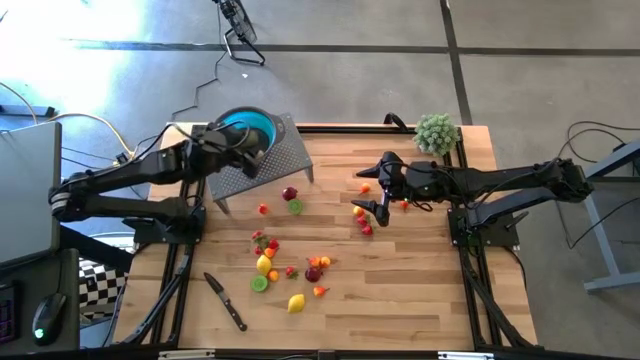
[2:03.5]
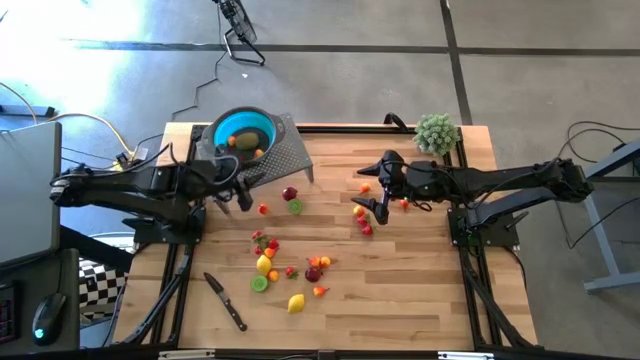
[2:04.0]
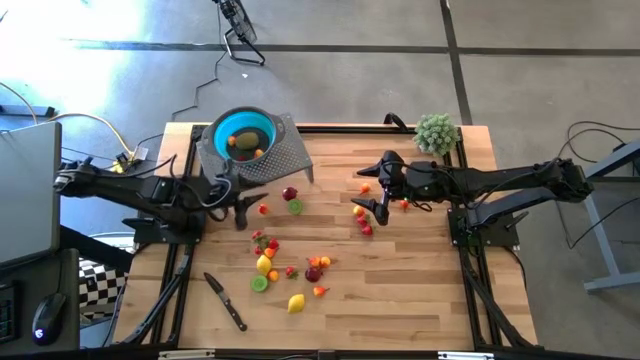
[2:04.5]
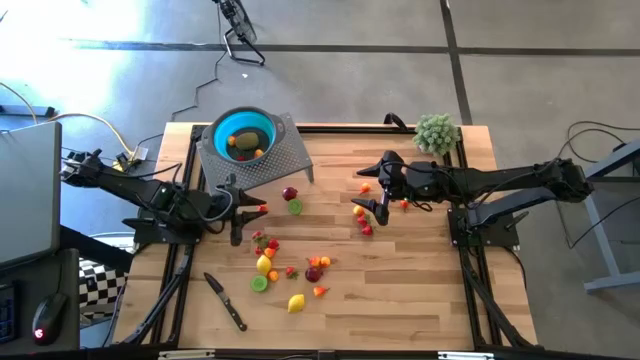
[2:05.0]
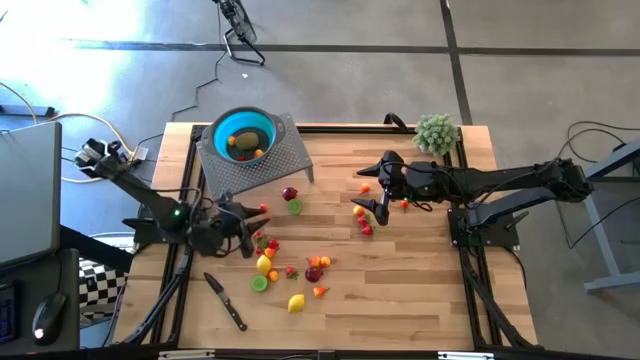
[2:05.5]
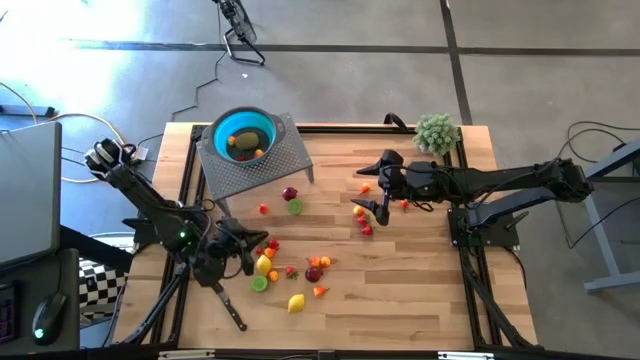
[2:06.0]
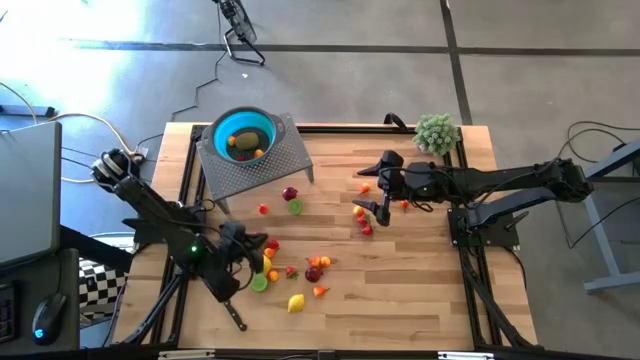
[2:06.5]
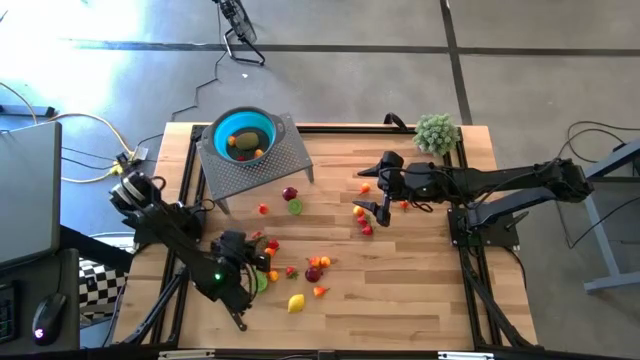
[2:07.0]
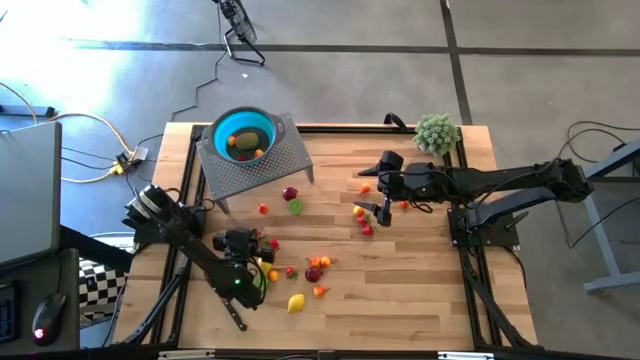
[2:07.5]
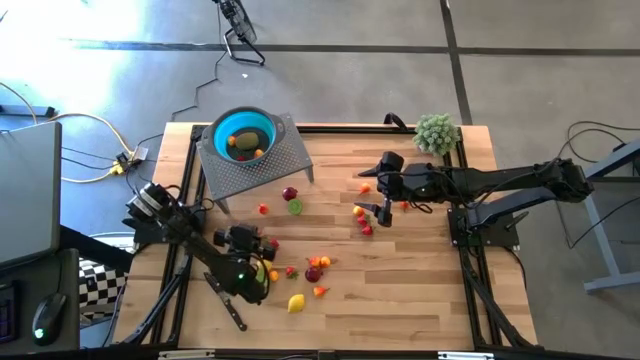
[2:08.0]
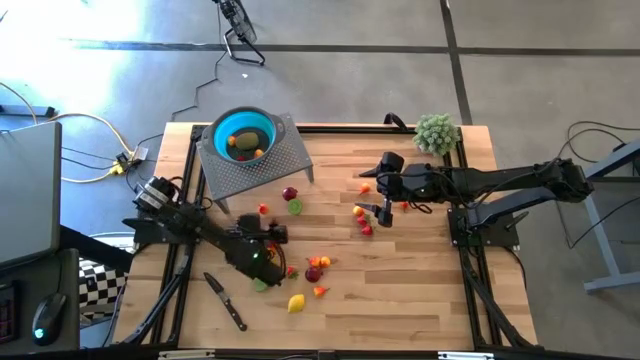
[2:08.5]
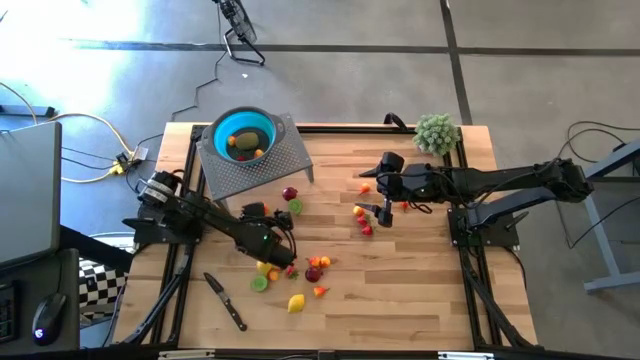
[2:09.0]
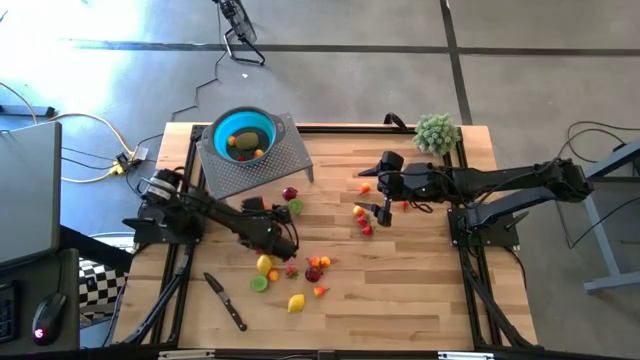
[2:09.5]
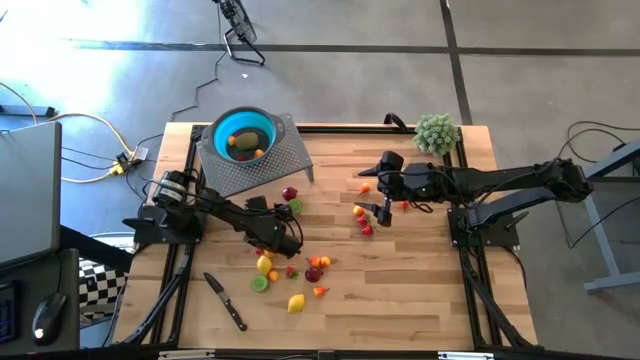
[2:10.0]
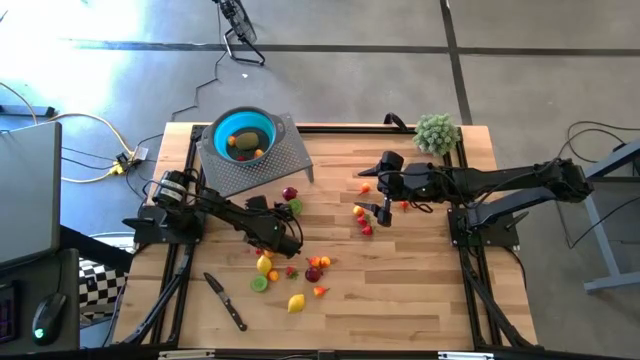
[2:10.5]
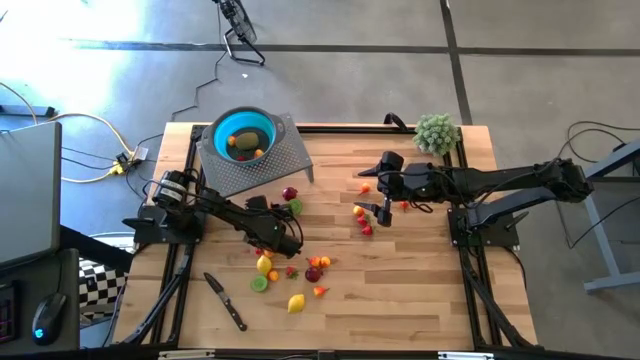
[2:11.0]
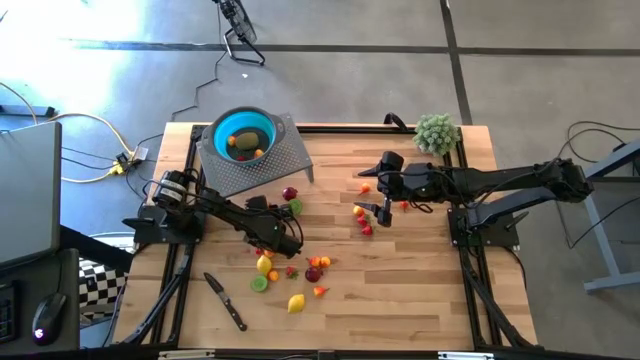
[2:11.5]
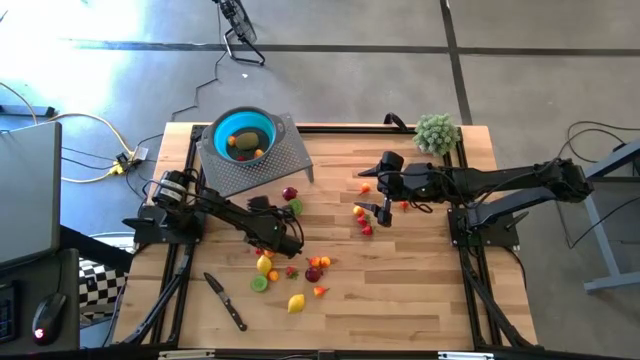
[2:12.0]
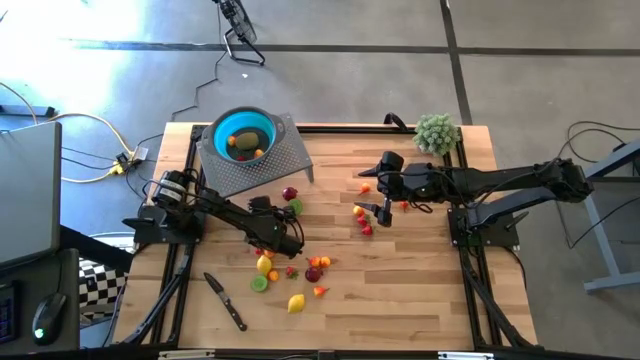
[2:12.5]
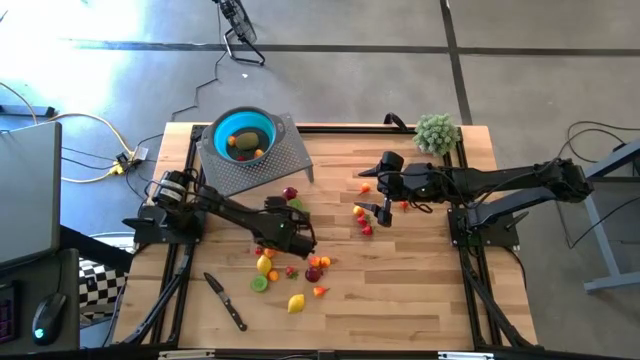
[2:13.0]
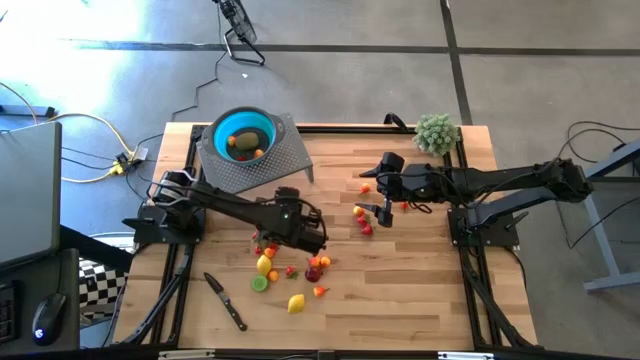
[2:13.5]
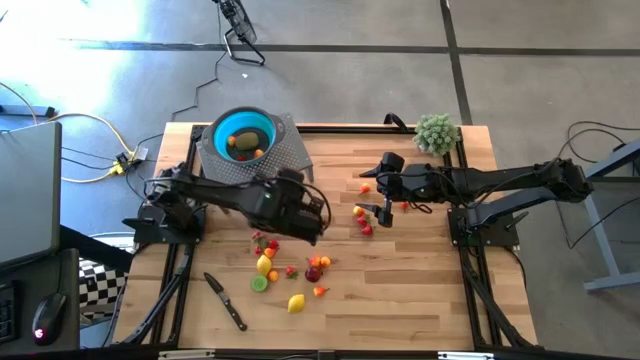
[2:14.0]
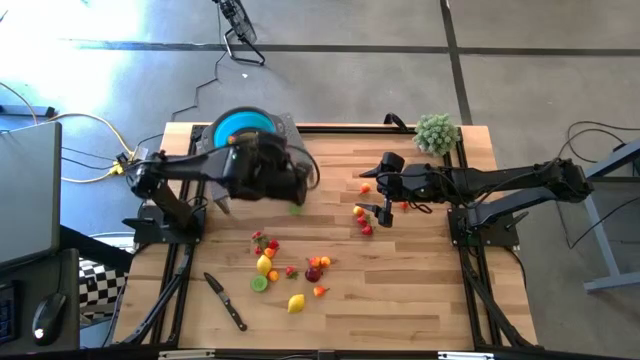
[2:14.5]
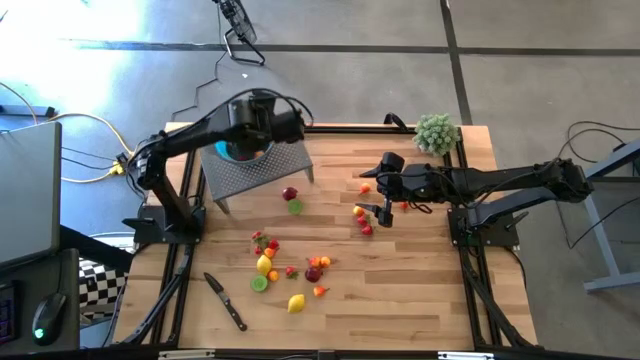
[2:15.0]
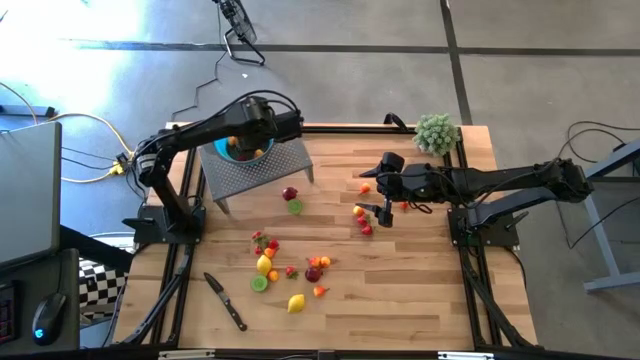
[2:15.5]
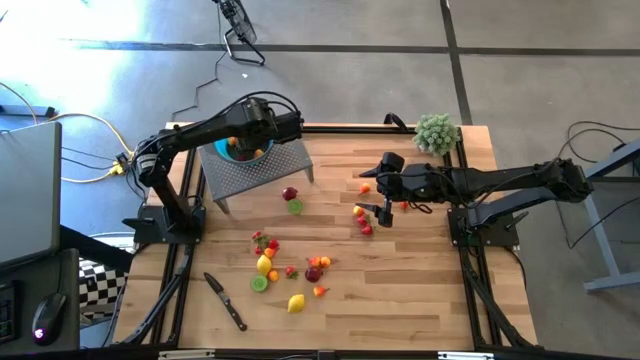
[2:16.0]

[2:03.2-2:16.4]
Task: Pick & Place Fruit
Put the orange pear into the blue strainer bowl on the shelf

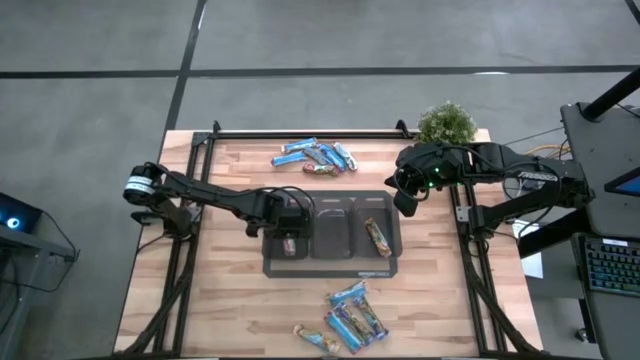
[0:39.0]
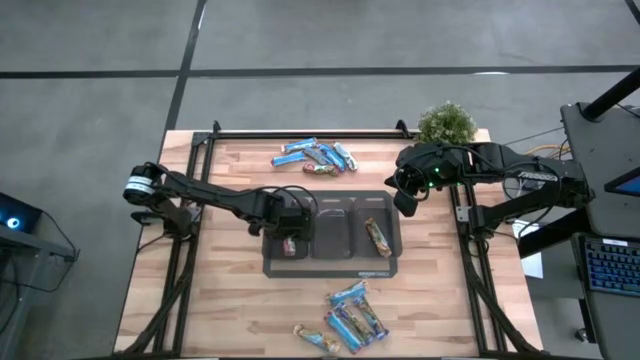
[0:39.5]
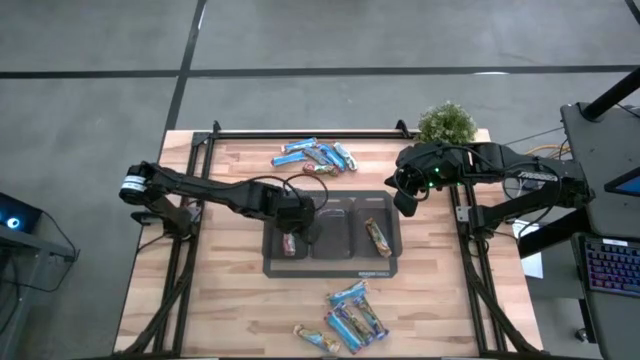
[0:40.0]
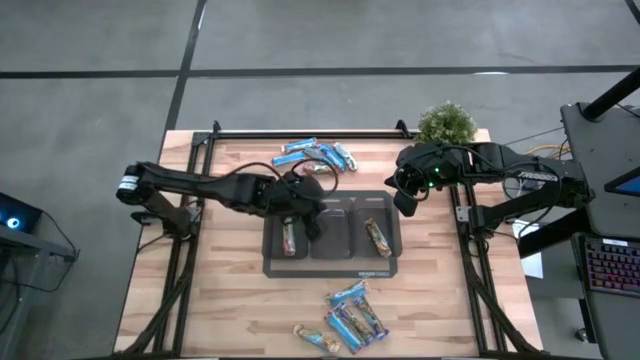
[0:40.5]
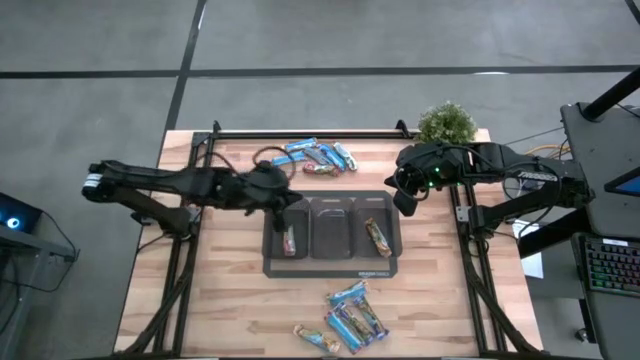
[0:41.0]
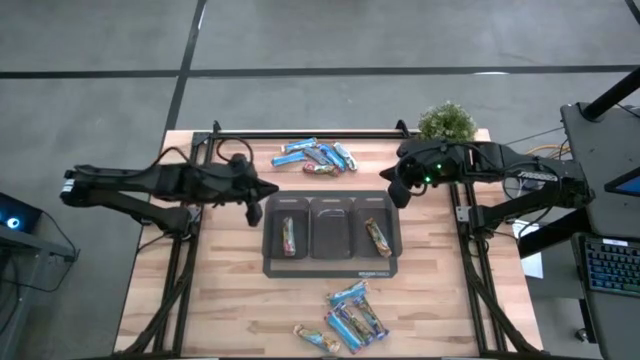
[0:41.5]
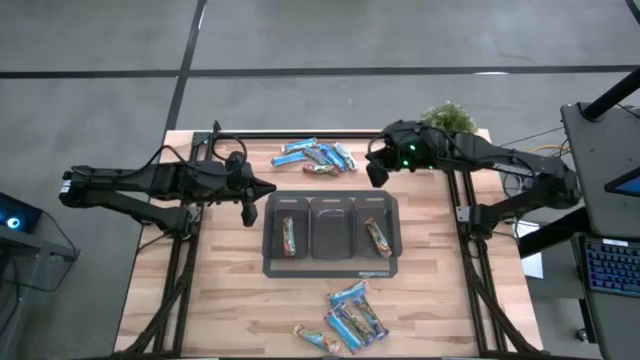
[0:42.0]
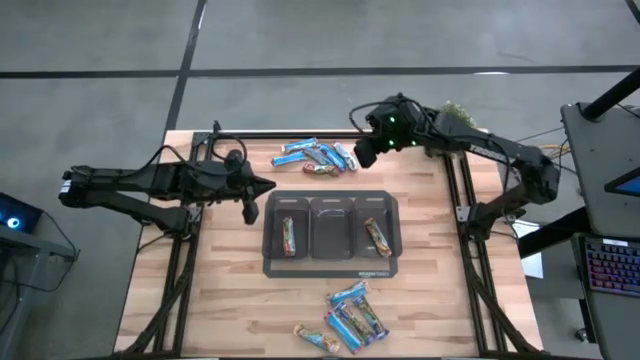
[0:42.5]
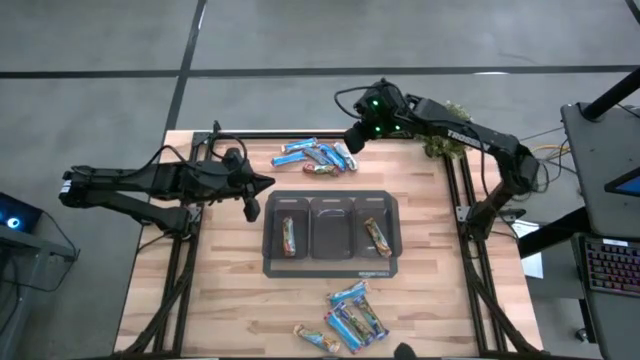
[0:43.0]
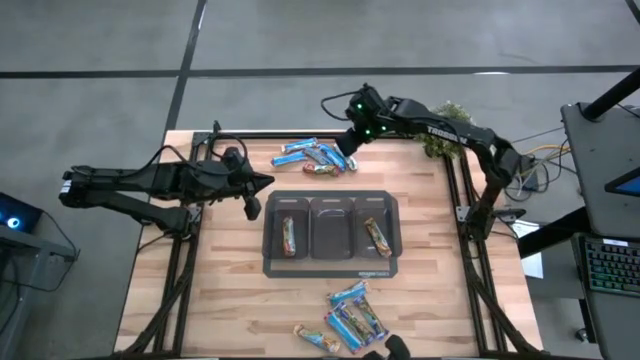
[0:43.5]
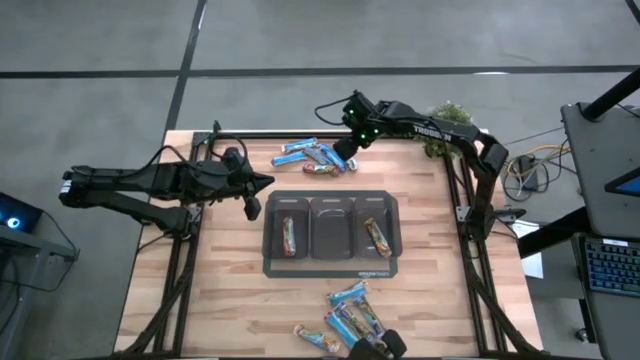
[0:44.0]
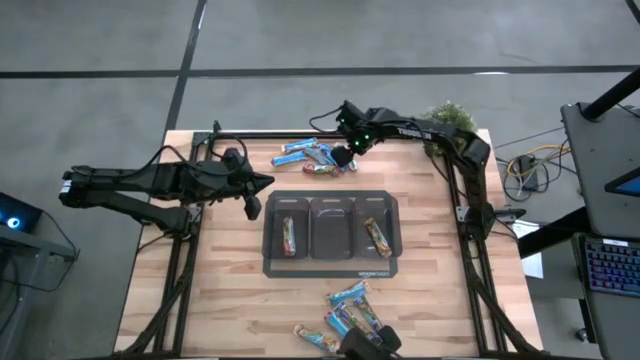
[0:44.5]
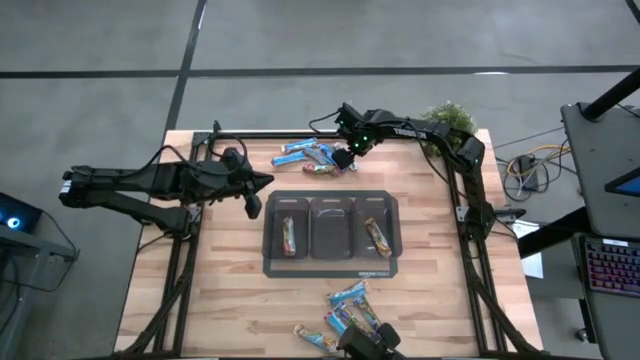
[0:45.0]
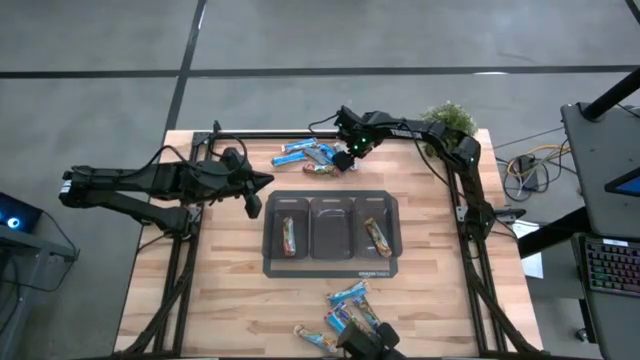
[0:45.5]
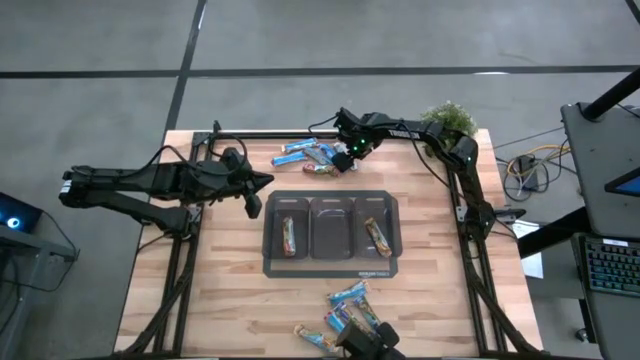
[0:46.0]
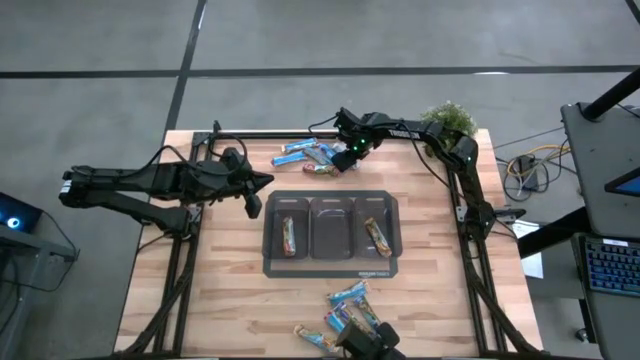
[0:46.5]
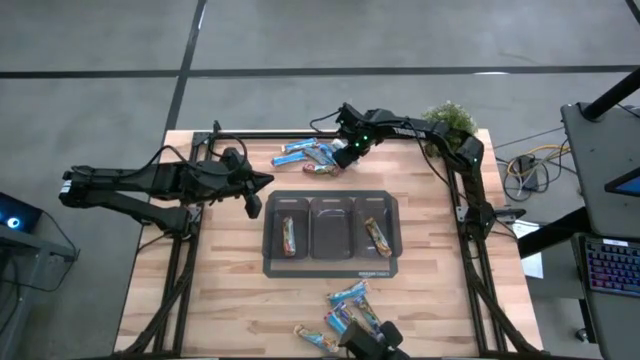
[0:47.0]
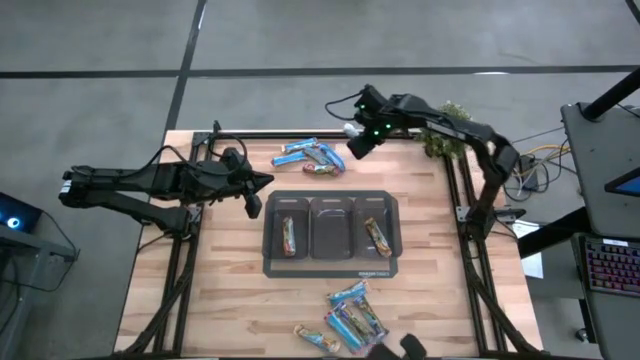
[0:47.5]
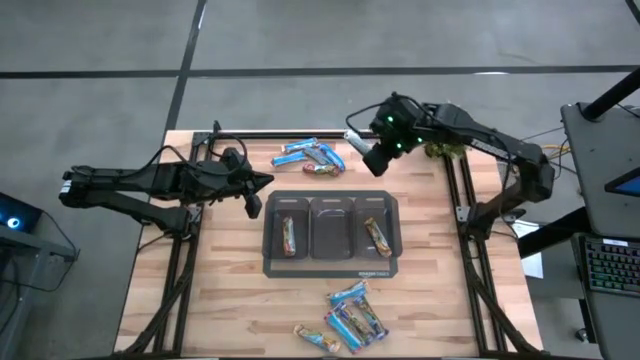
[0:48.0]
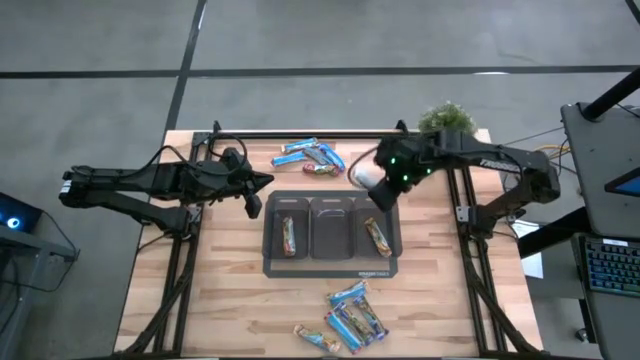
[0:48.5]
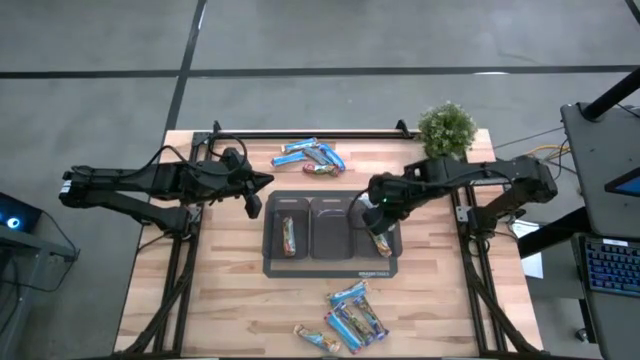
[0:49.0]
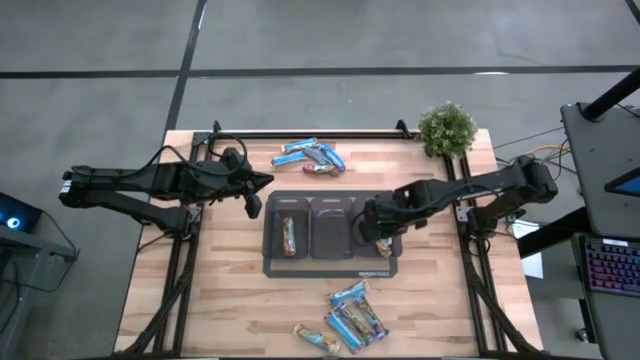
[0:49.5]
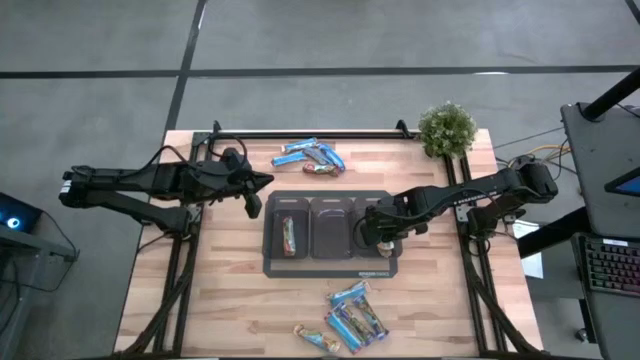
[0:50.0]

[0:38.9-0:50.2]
Task: Pick and place Granola Bars by type
Put the yellow granola bar into the right black bin
